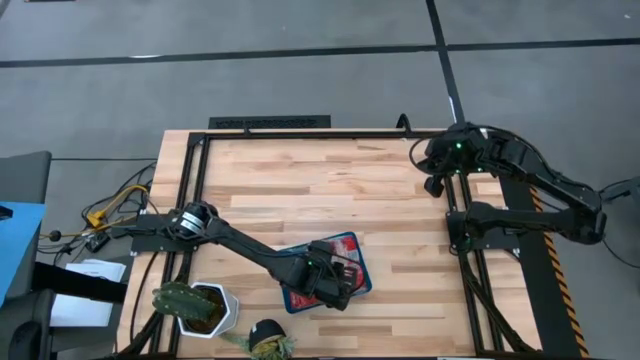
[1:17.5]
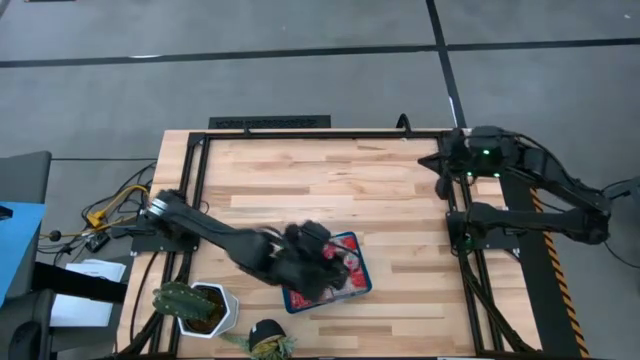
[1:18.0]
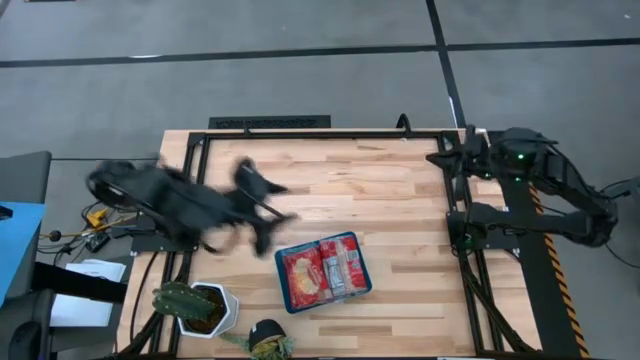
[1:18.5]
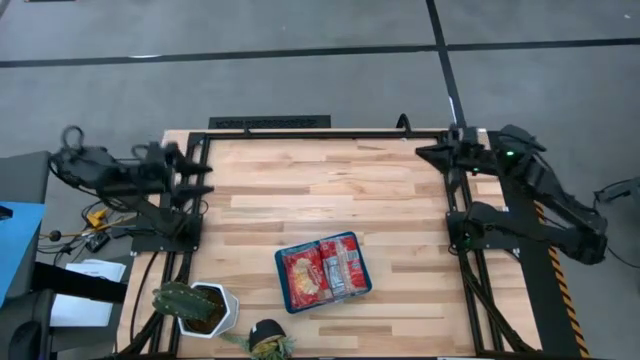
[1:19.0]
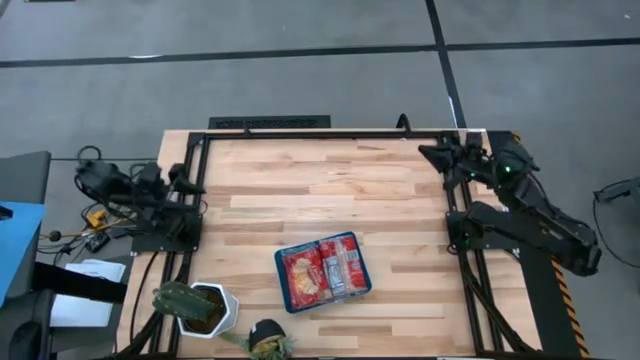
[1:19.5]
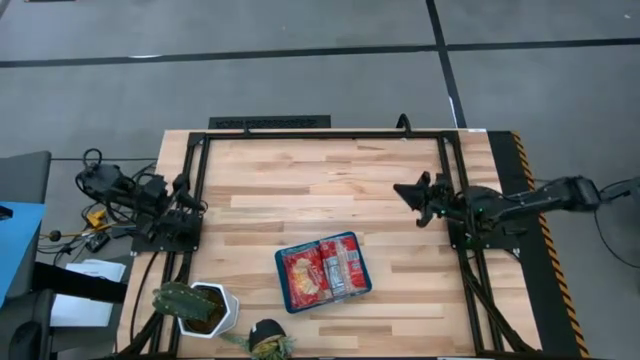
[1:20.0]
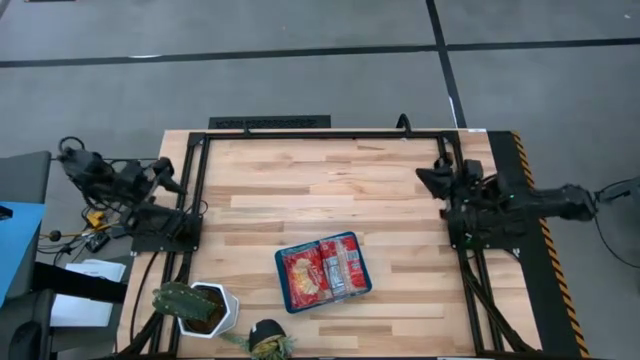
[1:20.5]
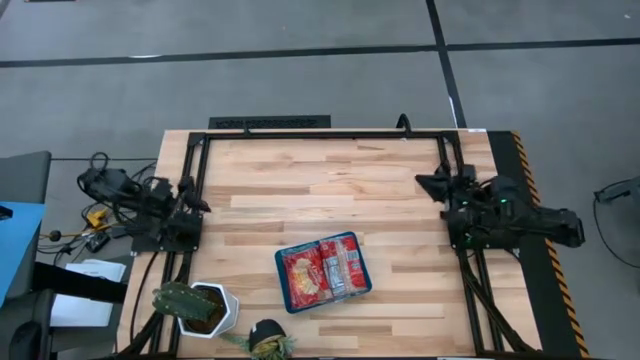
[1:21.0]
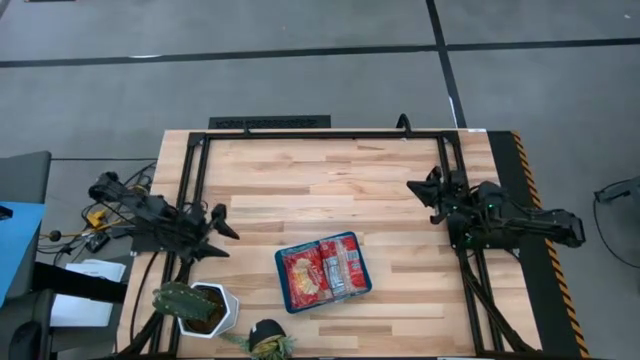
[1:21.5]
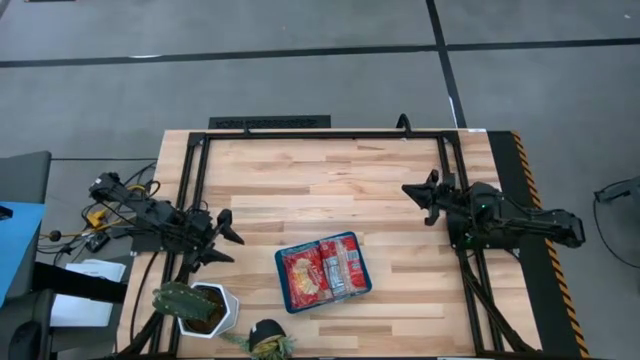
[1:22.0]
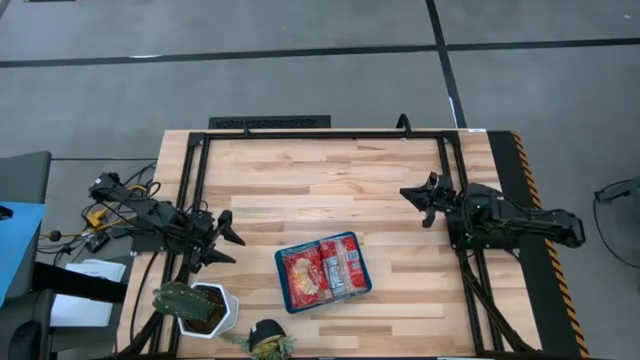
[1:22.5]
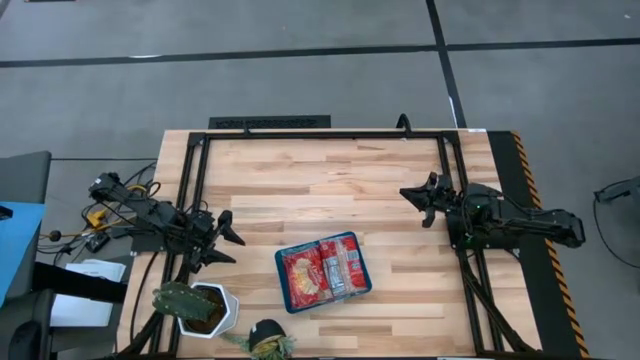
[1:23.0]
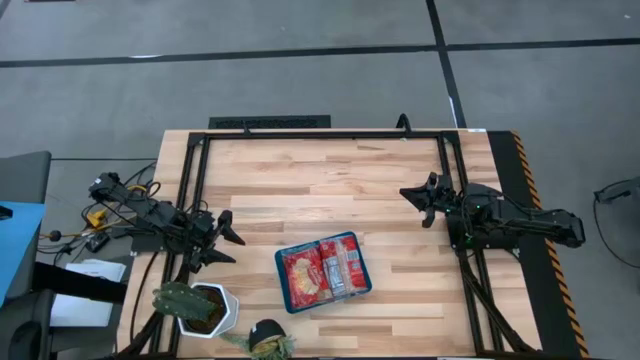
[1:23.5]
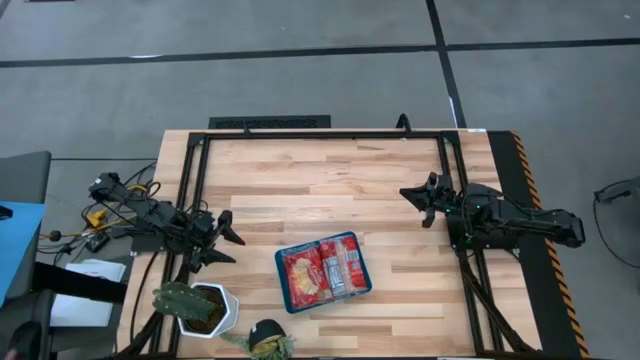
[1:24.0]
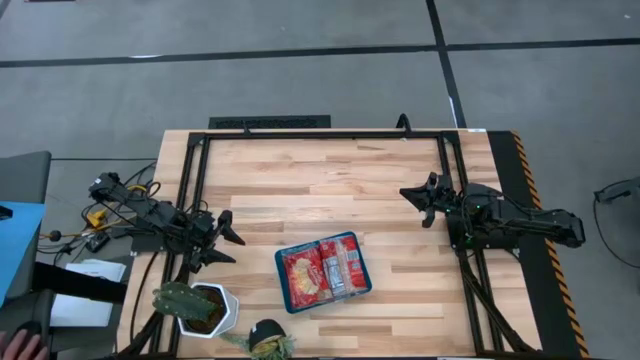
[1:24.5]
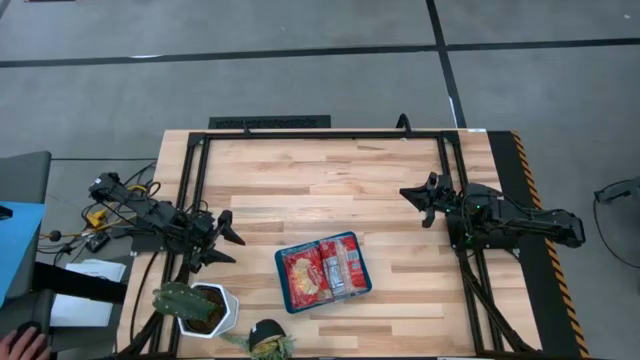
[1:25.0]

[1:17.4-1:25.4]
Task: Sort popcorn bags into baskets
Return to Home Position

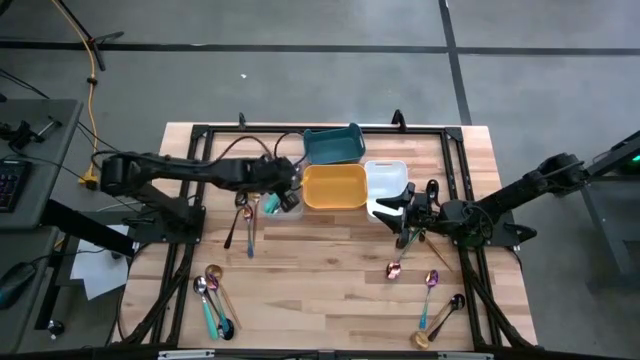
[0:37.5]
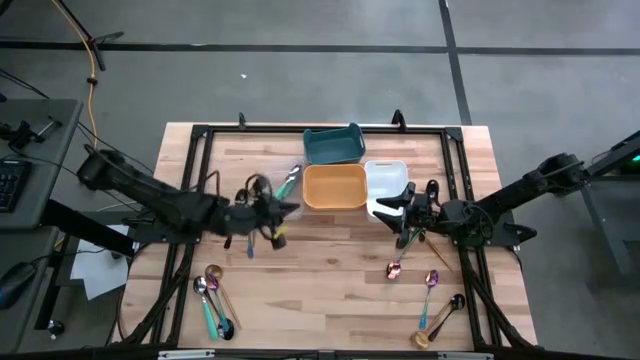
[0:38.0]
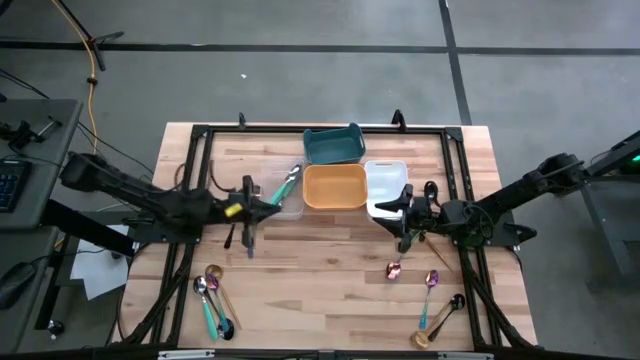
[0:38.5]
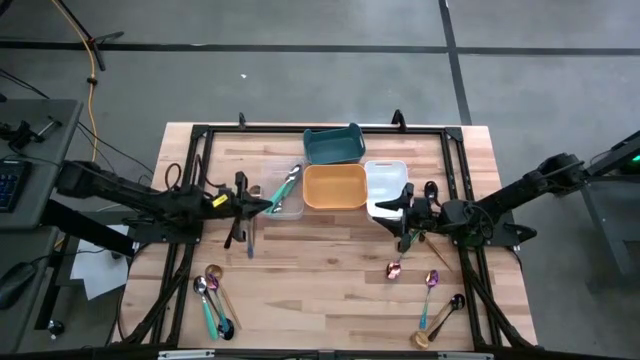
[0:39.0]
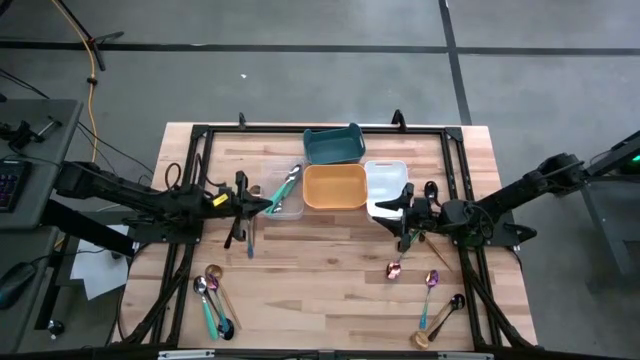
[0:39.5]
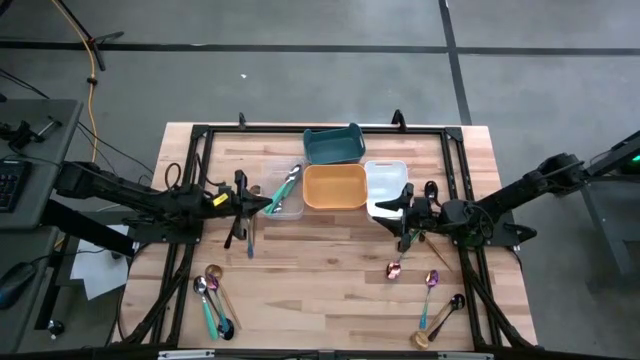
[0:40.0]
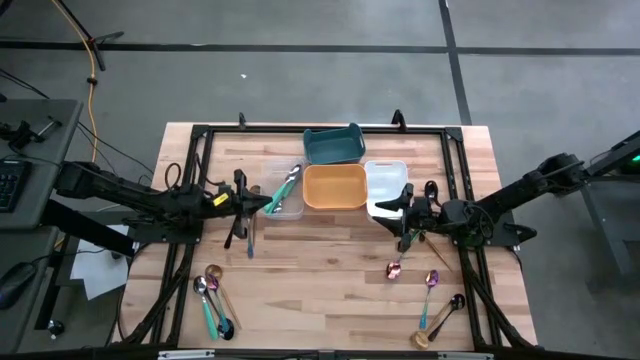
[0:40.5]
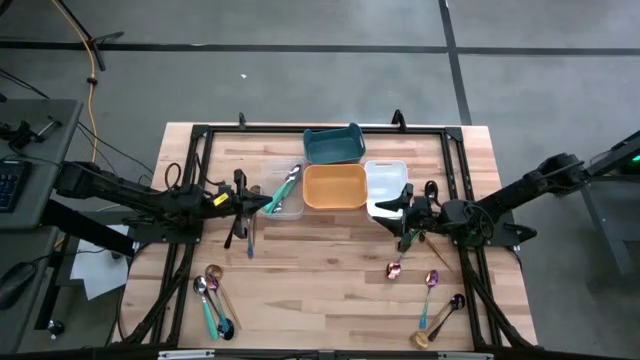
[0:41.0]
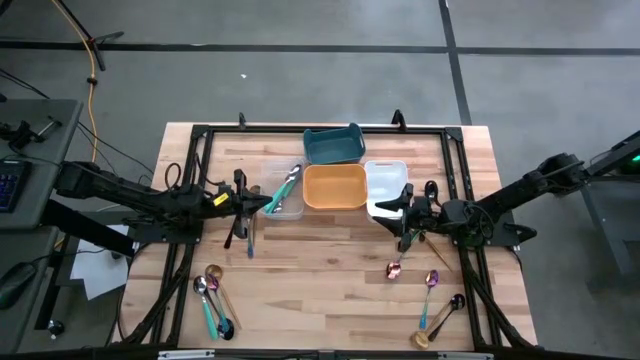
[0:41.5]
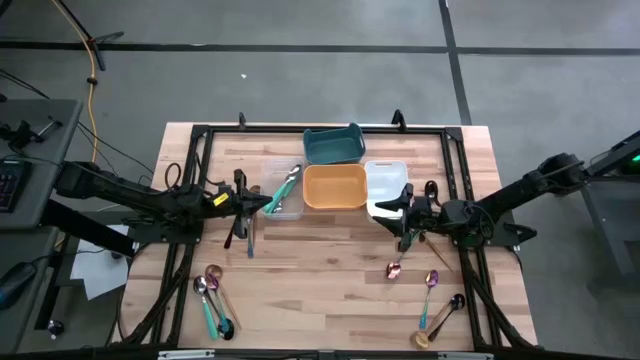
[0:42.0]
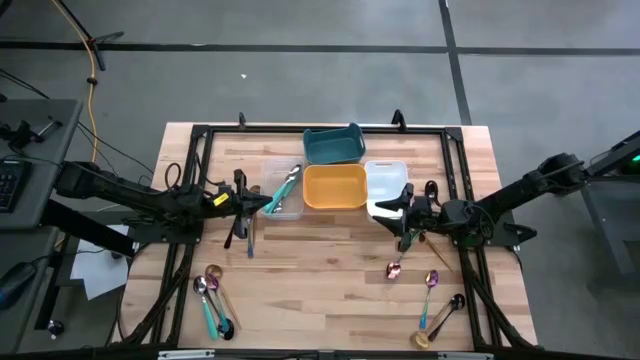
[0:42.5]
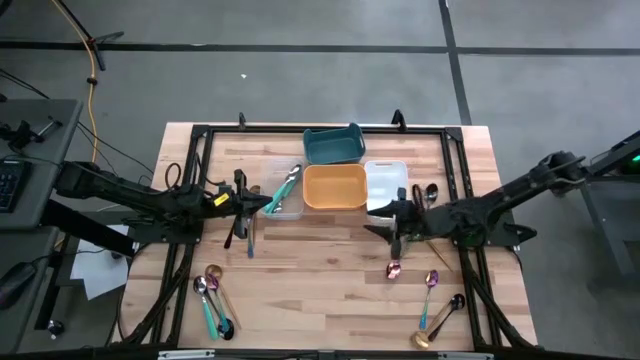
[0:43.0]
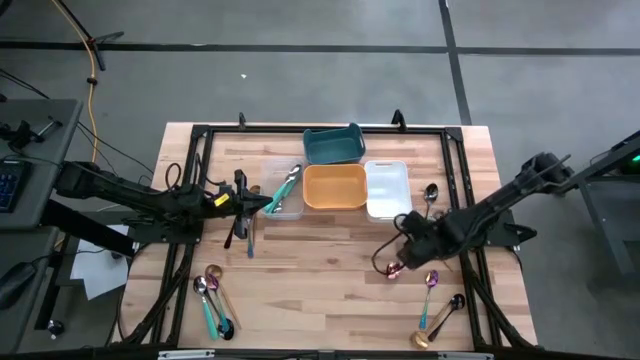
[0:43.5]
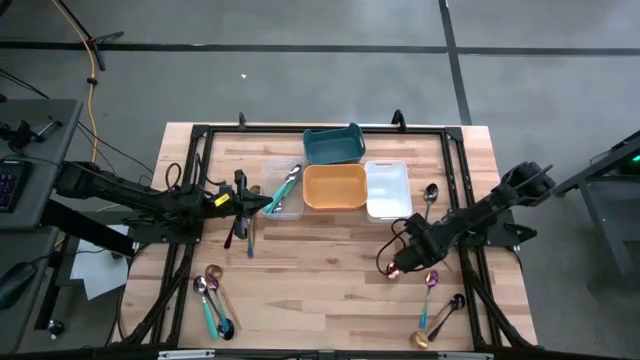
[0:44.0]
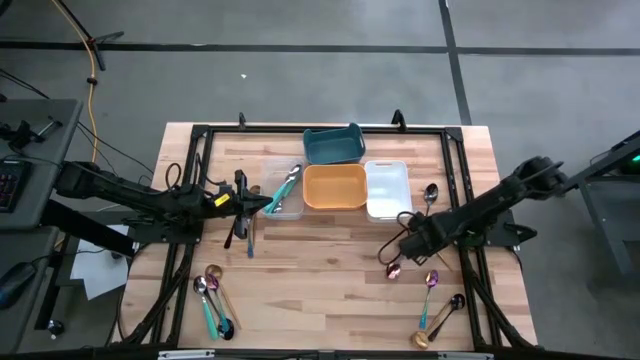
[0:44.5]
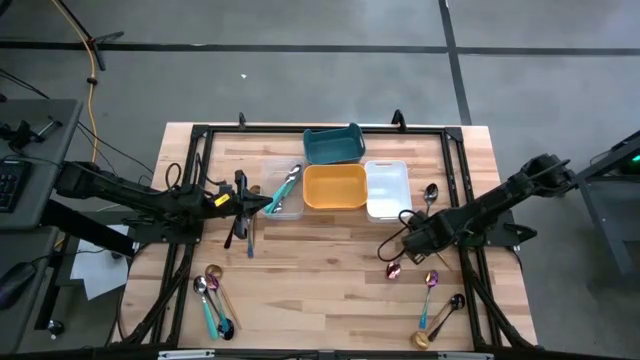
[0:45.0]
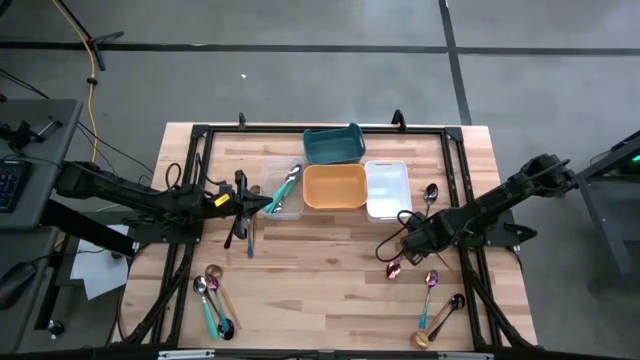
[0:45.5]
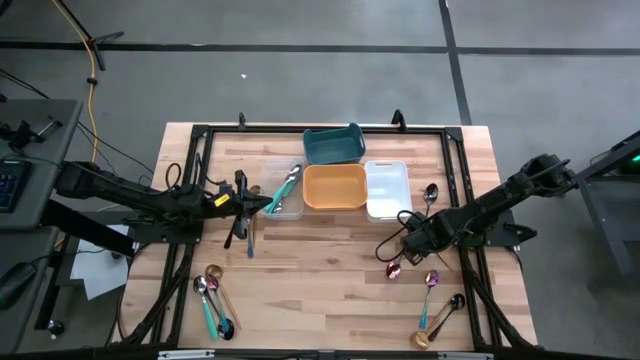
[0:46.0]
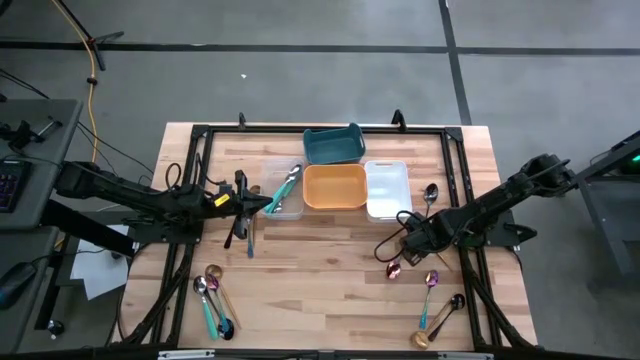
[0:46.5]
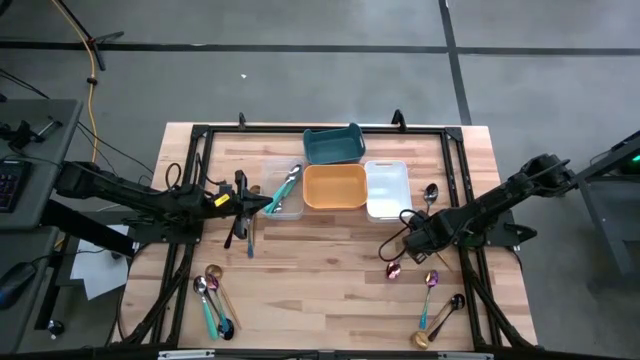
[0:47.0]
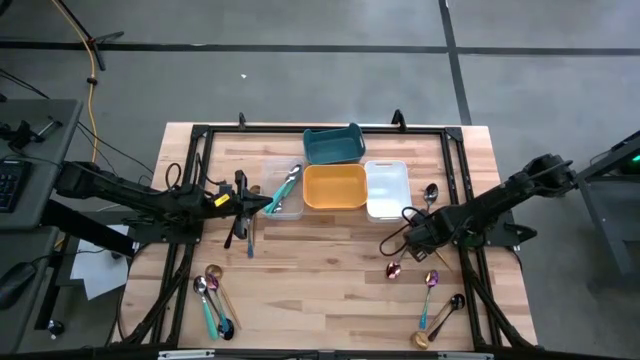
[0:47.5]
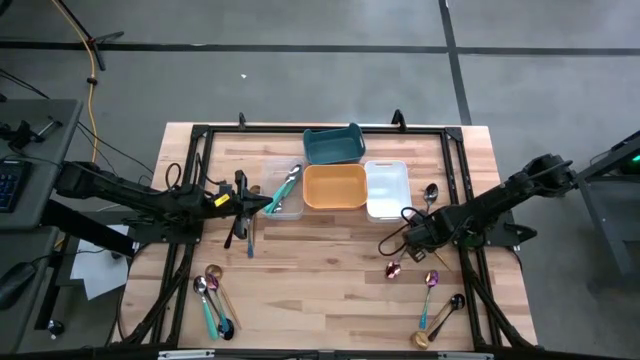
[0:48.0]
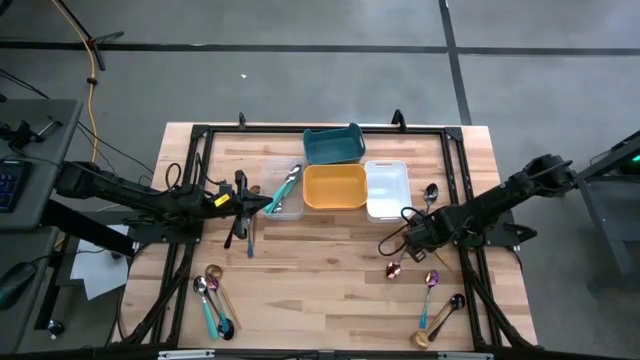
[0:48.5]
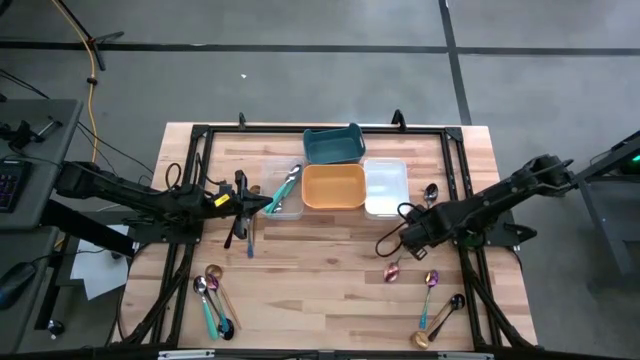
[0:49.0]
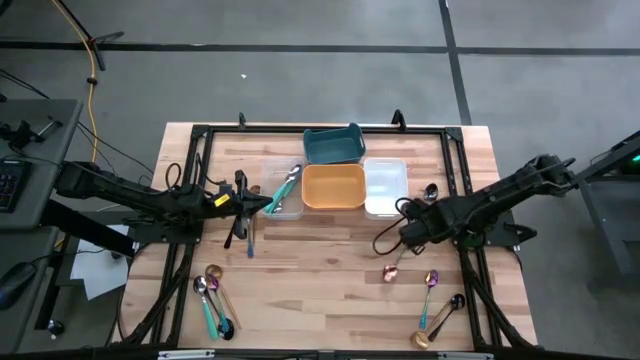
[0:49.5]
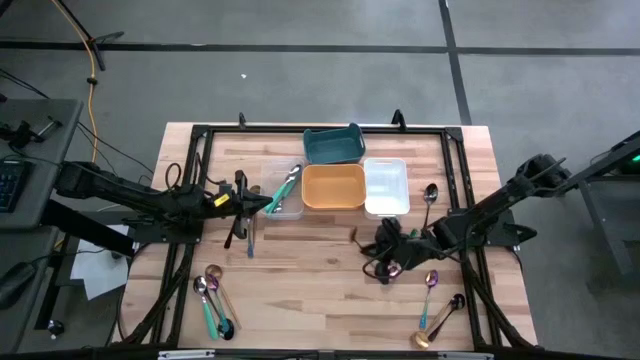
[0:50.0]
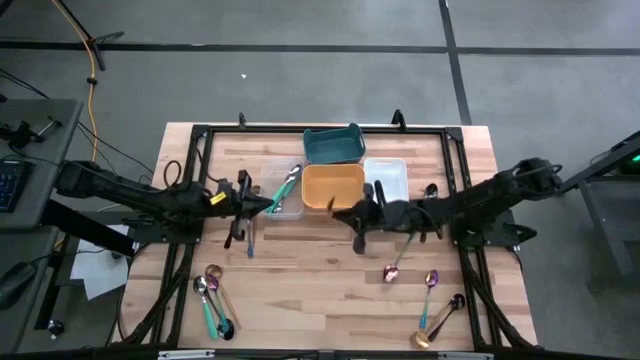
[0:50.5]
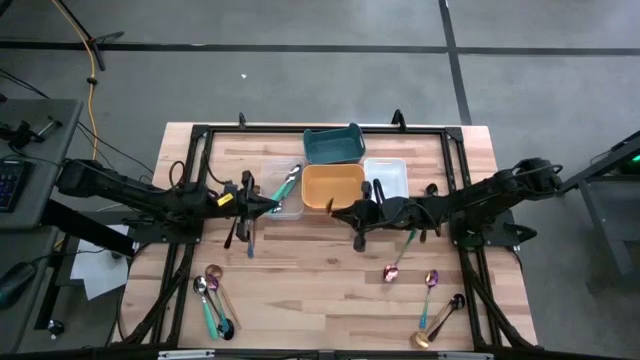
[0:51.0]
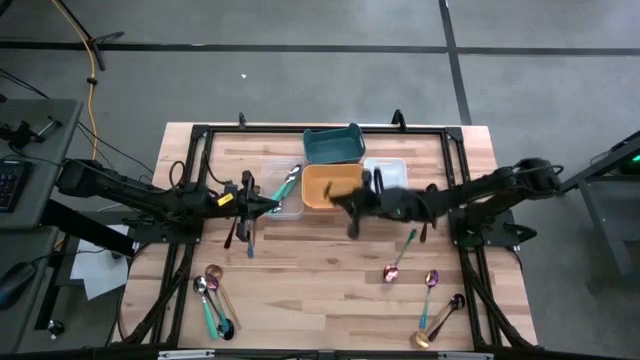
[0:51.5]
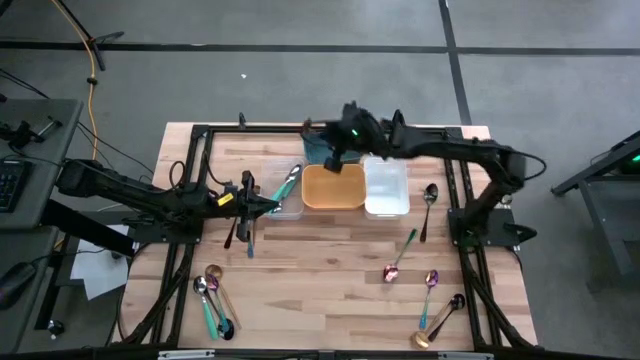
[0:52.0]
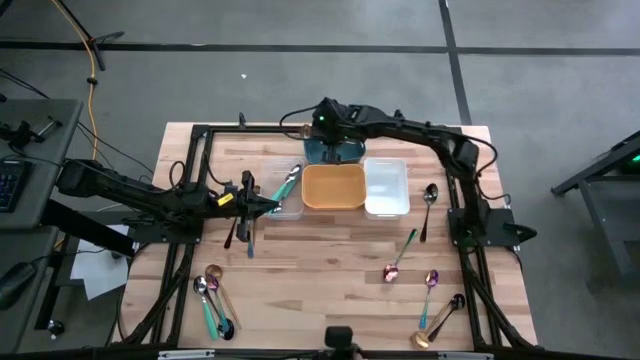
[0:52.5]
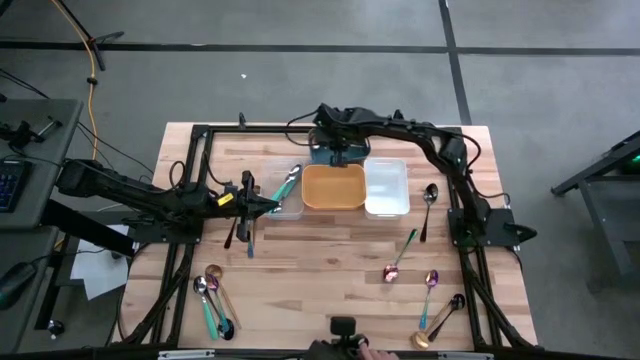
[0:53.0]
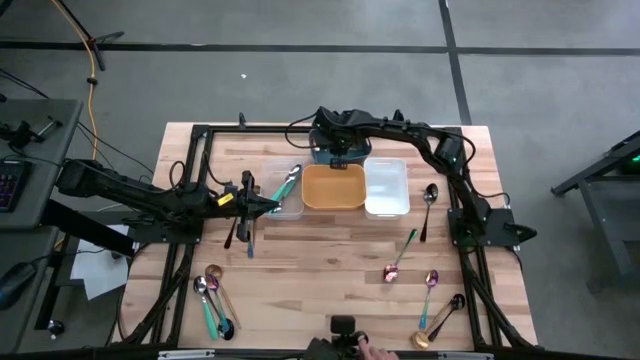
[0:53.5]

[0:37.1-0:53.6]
Task: Sort silverware by color (type)
Put the gold color spoon in the green bin
